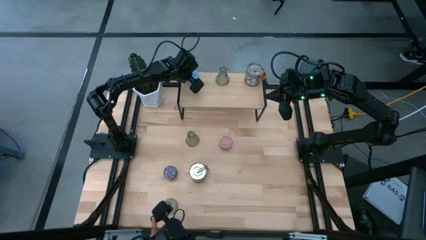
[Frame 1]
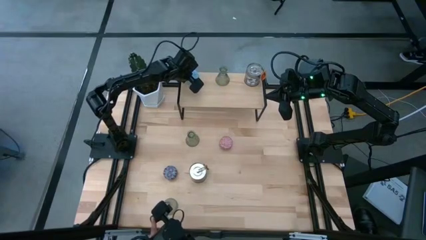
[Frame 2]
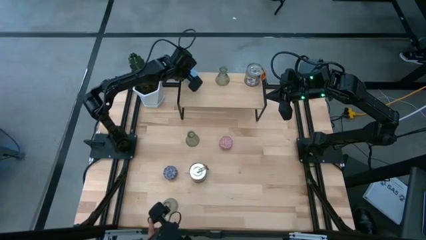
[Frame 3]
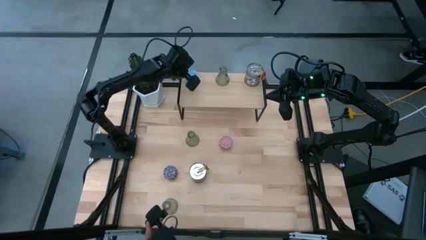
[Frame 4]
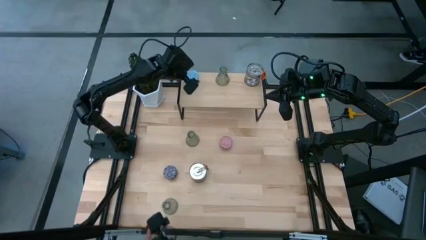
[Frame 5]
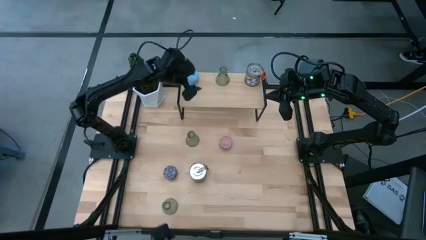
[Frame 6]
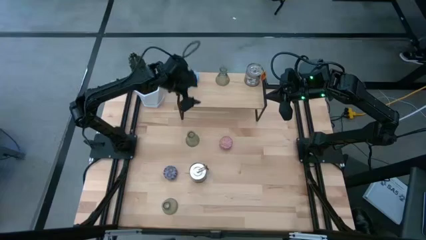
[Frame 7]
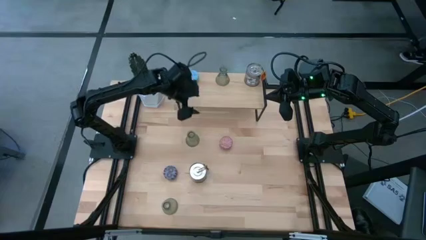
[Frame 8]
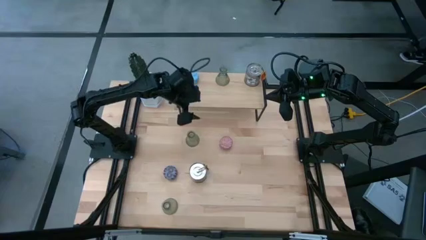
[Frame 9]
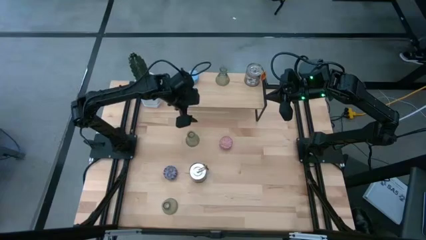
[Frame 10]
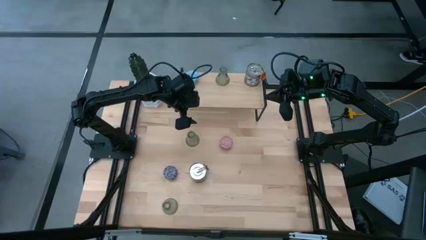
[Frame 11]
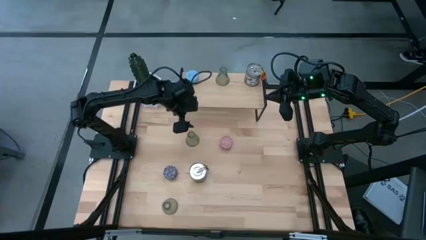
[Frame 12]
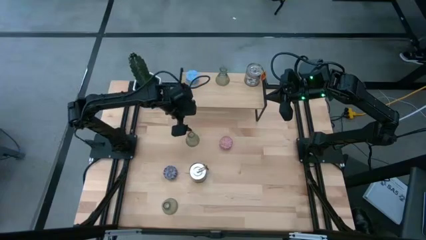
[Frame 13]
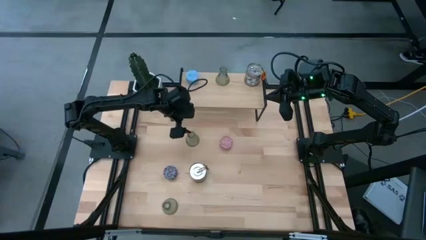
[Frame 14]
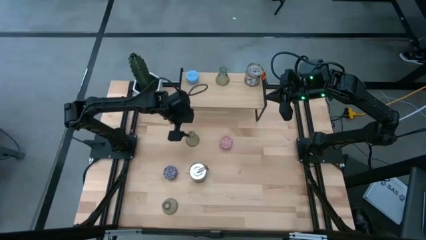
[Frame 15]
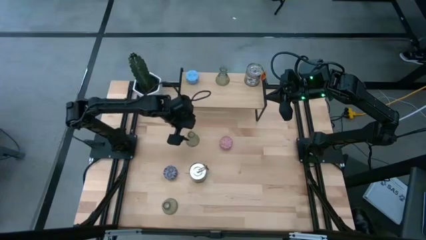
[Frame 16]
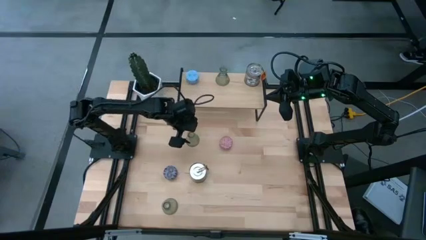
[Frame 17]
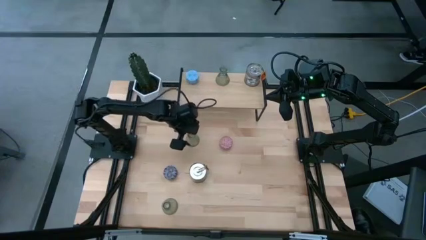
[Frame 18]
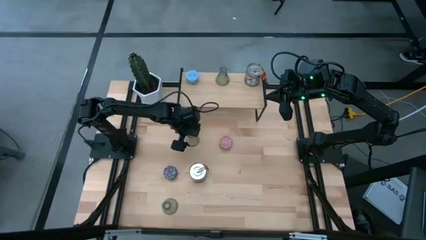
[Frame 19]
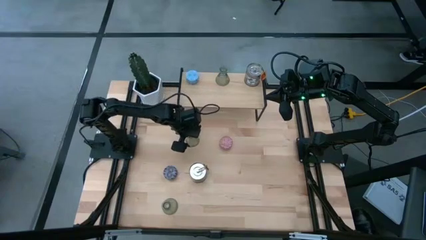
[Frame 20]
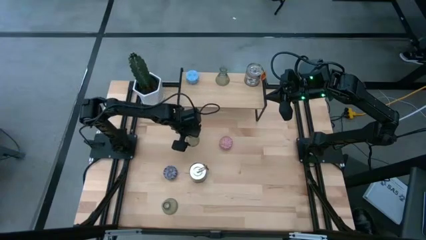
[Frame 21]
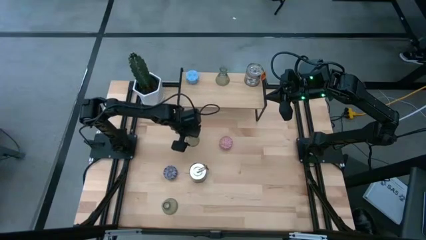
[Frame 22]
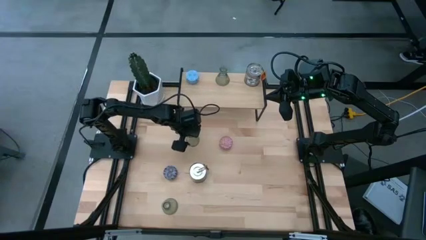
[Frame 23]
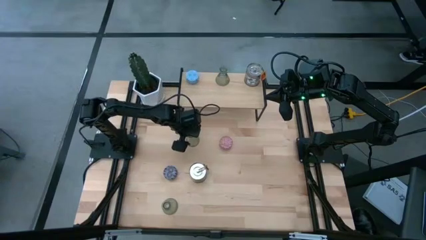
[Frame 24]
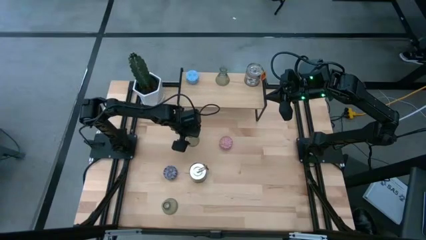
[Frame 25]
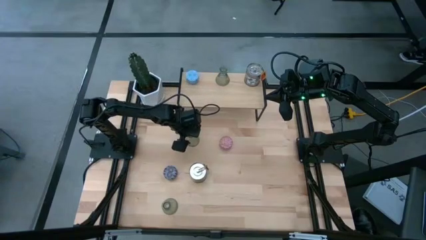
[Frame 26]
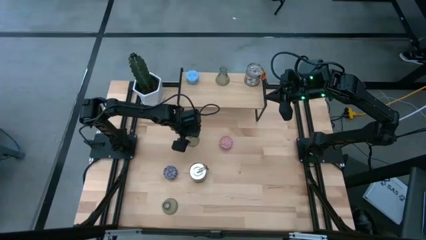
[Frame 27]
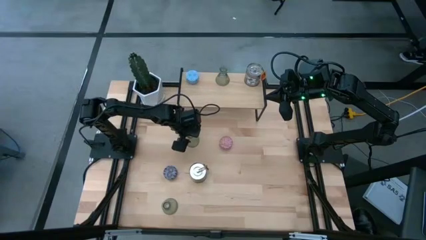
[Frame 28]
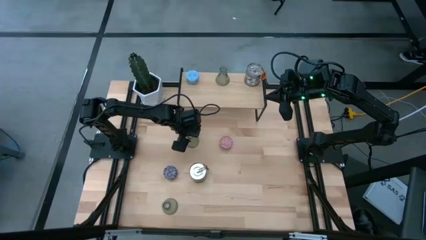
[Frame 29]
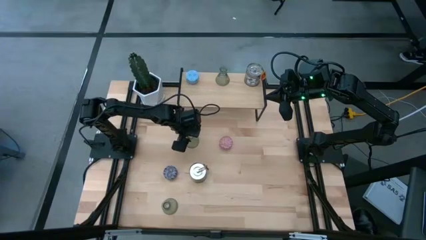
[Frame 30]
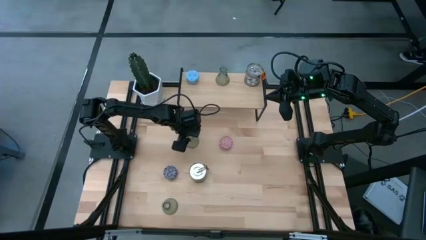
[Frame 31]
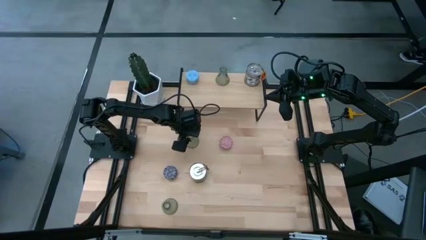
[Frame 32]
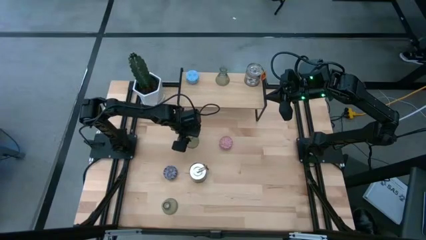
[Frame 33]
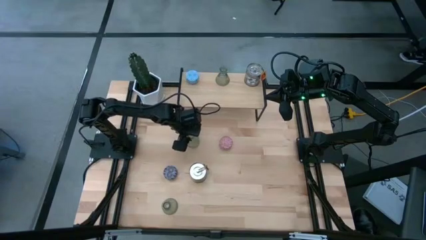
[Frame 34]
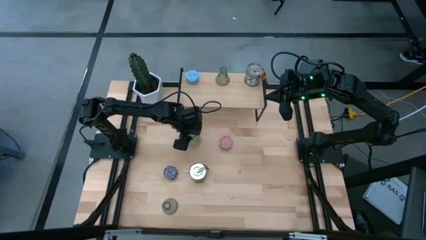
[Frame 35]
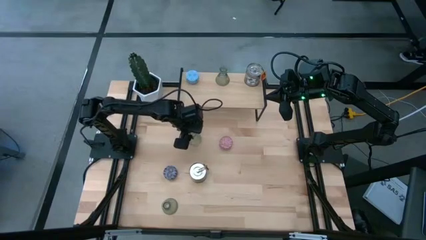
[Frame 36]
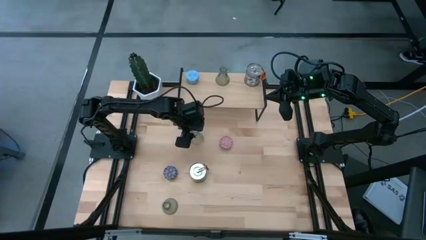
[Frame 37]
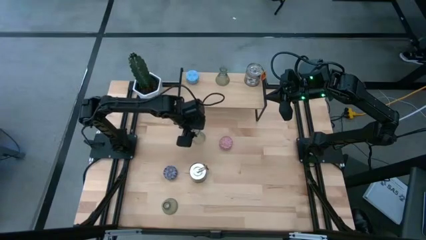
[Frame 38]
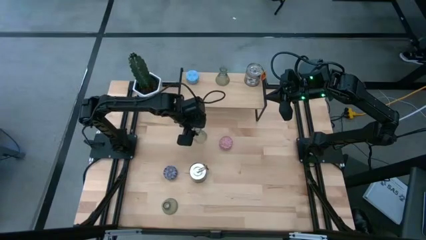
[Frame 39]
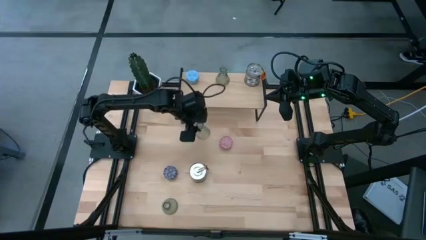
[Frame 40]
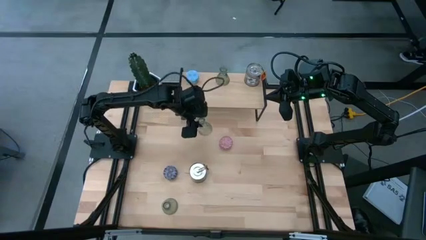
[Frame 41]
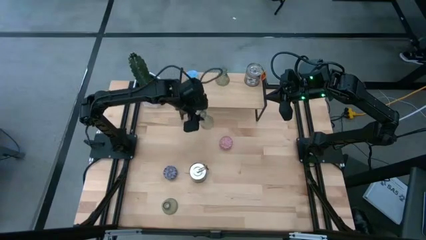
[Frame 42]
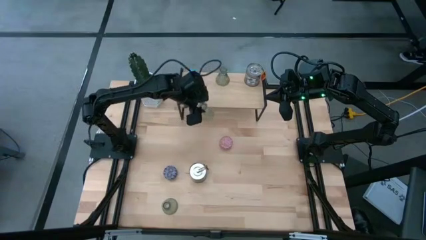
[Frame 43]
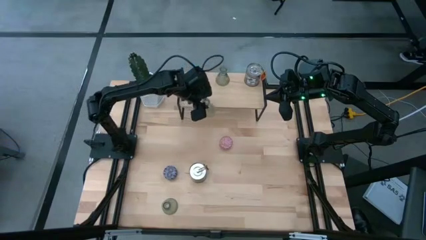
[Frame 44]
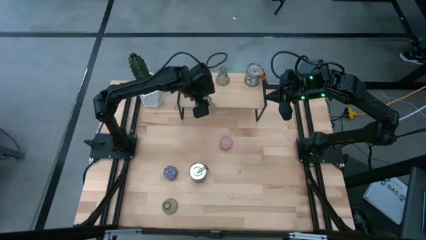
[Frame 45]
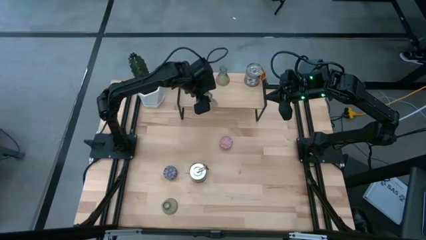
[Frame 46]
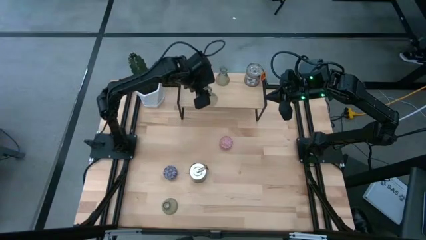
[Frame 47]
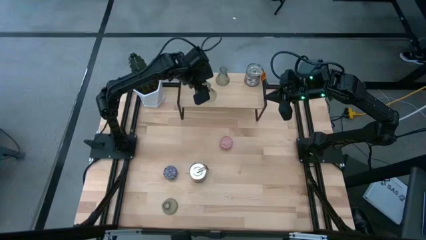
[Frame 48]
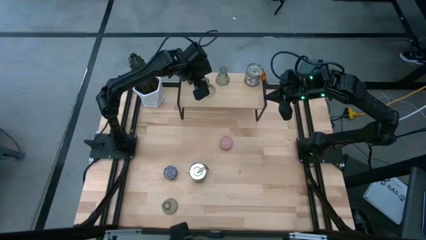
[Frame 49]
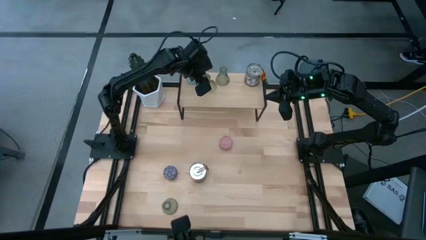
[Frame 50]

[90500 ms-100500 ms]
Task: Pick & Place candle stick holders
Put the top green glass candle holder aligned with the green glass candle holder on the shelf
